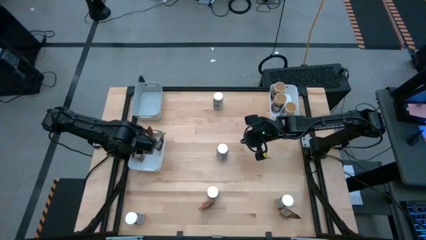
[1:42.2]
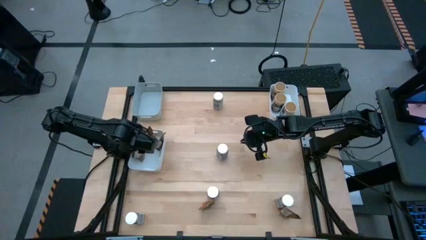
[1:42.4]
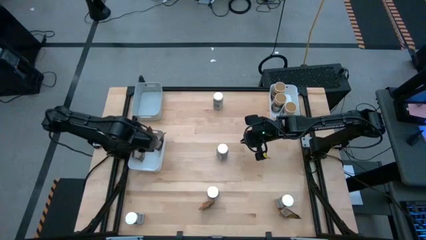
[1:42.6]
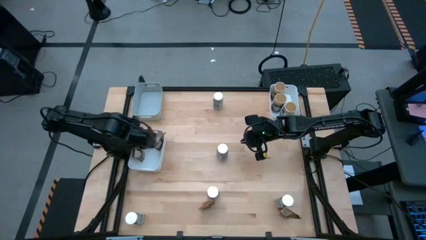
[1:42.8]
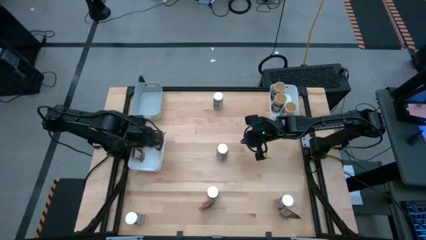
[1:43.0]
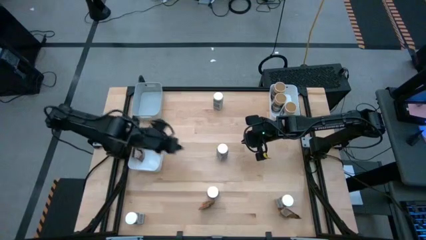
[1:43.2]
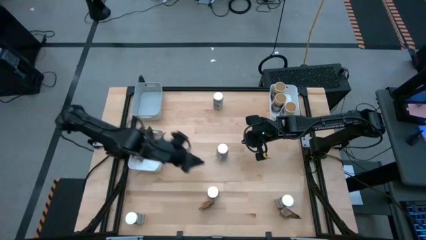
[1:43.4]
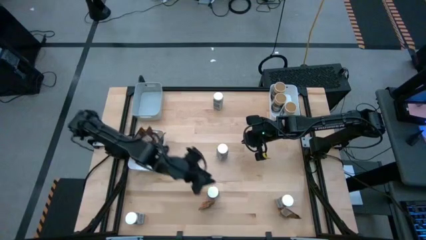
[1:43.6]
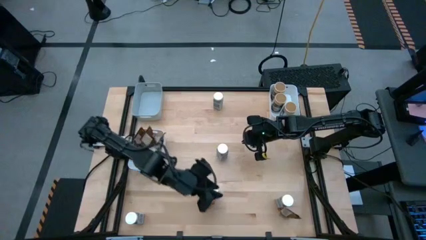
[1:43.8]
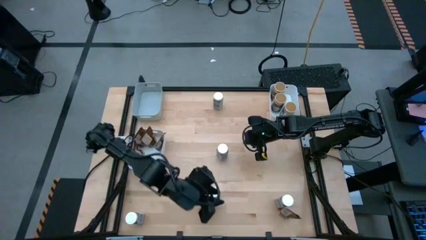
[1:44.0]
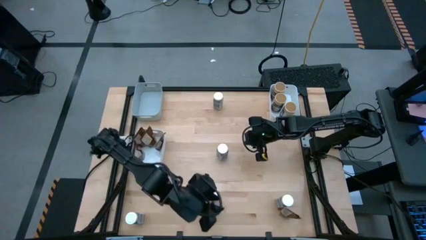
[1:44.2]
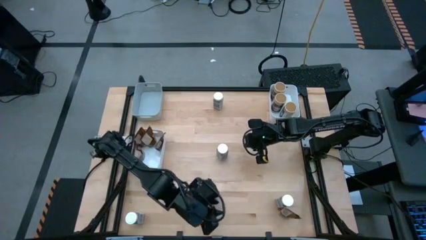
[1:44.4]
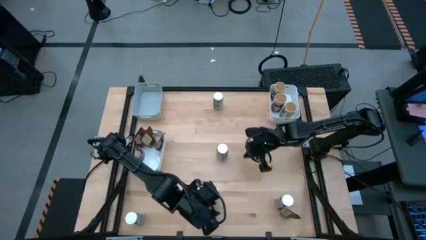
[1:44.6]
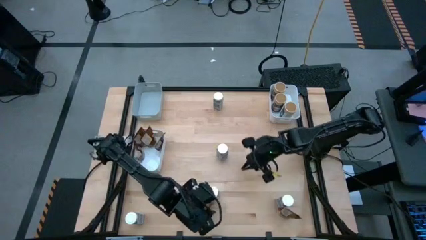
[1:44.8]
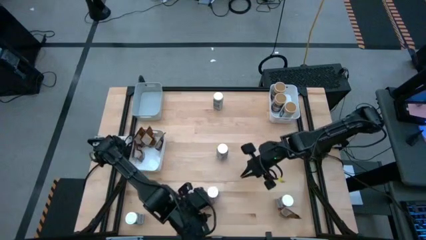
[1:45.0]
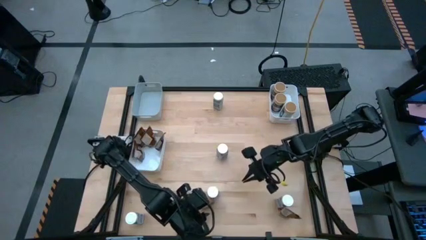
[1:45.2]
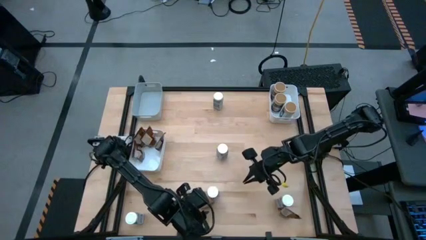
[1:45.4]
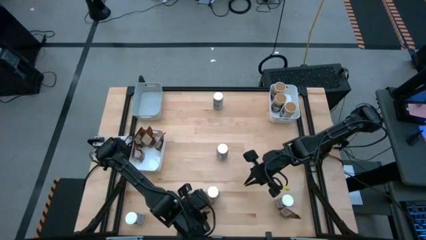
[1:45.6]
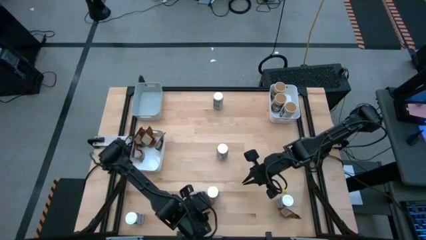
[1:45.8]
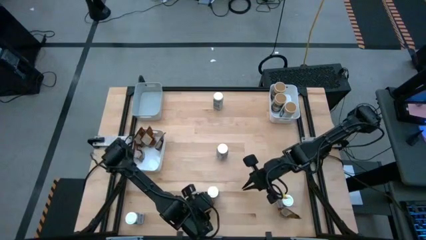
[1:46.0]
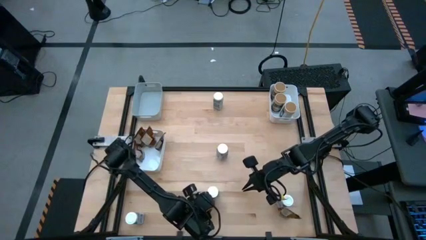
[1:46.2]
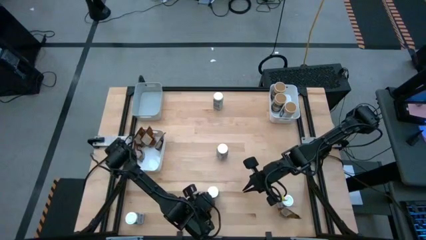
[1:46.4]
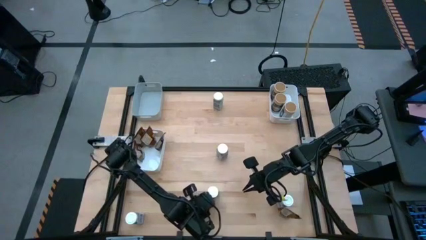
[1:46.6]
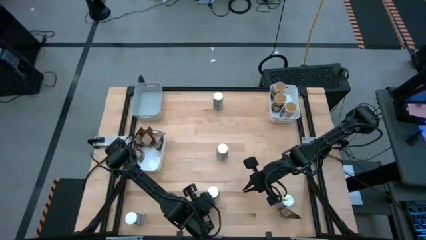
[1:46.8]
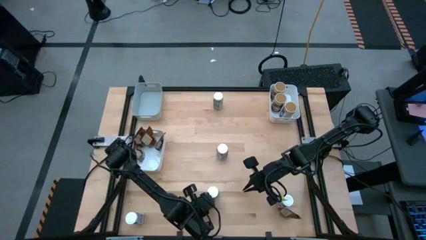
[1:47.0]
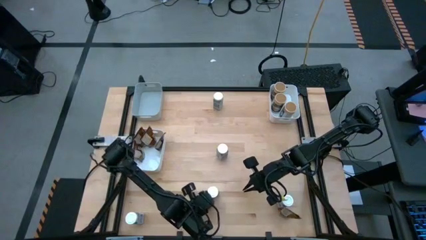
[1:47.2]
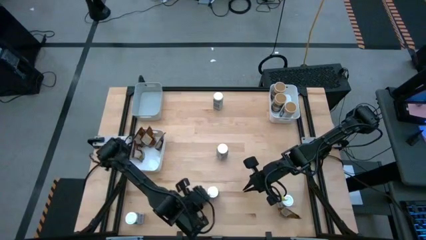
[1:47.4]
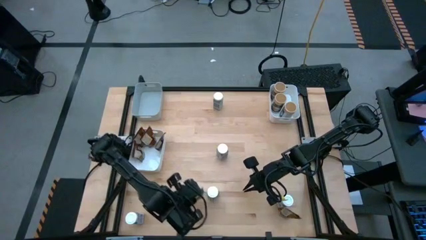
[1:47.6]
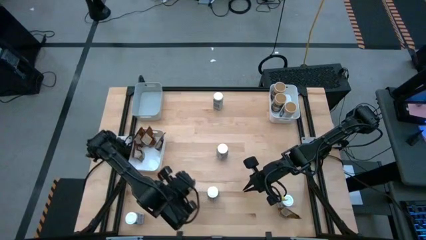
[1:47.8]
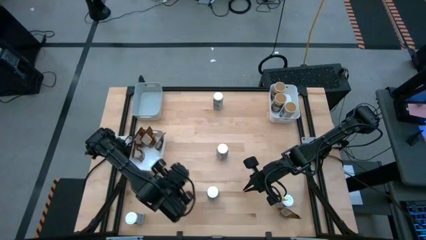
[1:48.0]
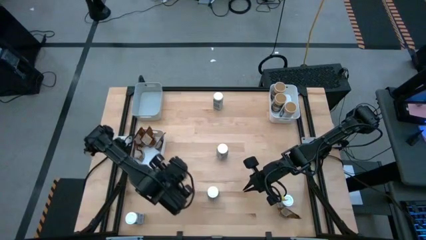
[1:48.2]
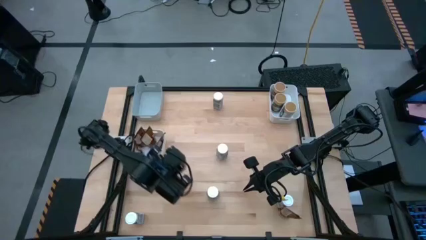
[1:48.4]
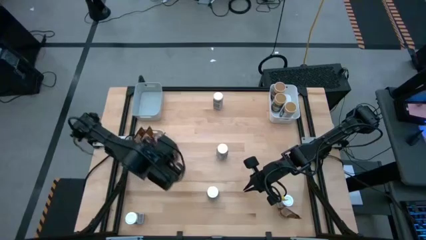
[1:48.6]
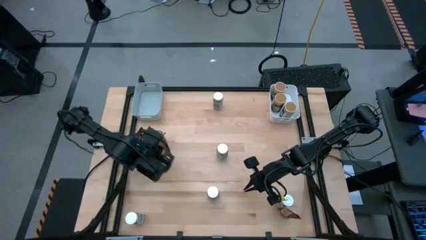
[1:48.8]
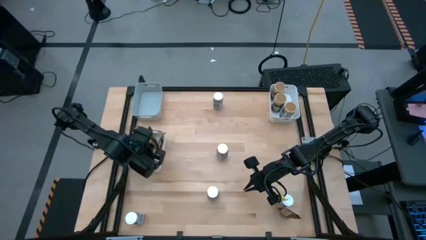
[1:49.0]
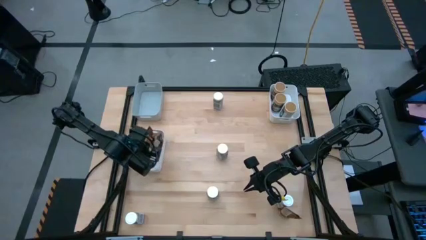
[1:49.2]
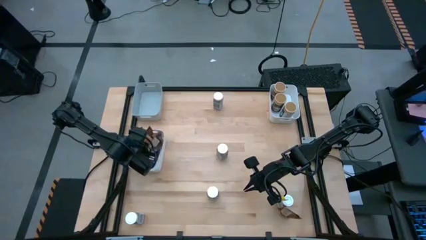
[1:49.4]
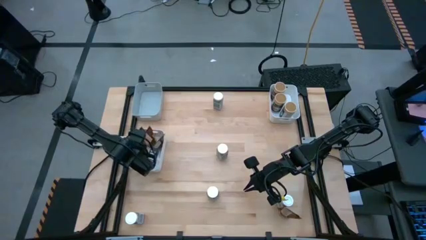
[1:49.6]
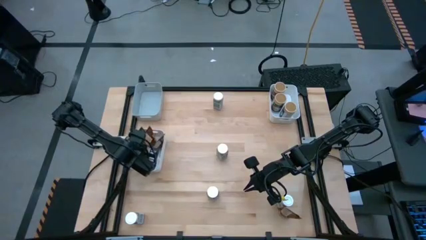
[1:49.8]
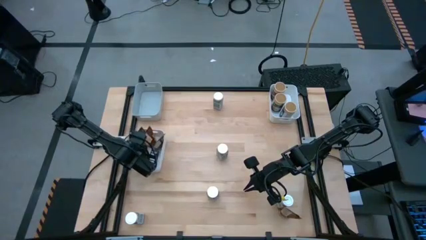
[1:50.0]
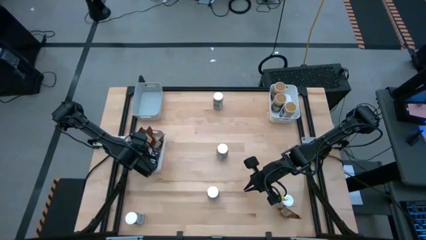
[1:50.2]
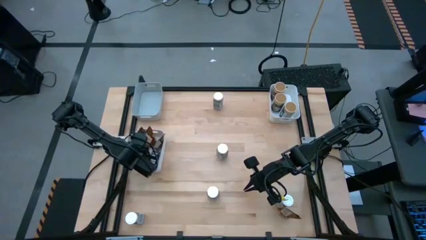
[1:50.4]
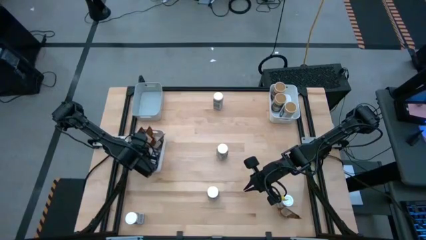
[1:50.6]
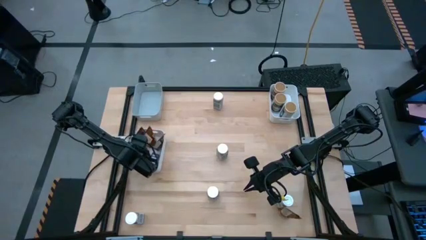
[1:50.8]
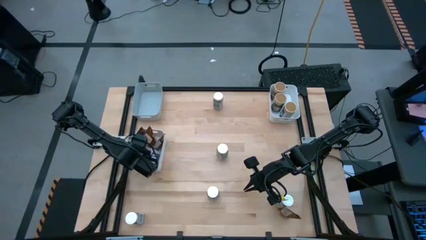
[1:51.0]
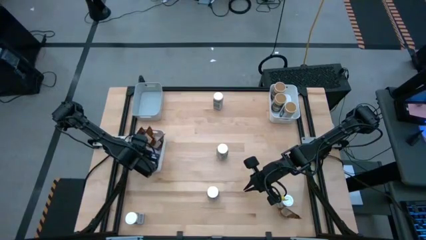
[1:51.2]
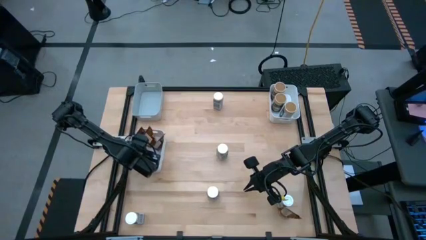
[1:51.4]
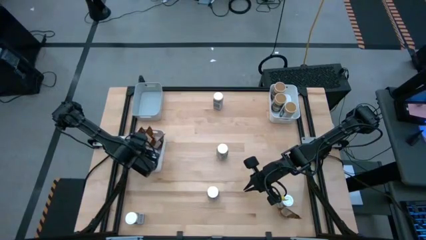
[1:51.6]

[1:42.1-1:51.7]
Task: Sort spices by type
Put the orange seasoning pack into the left white bin

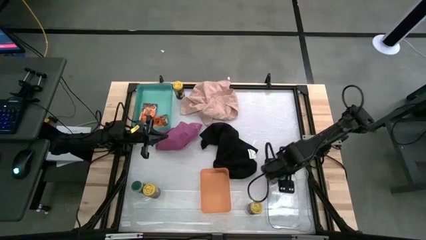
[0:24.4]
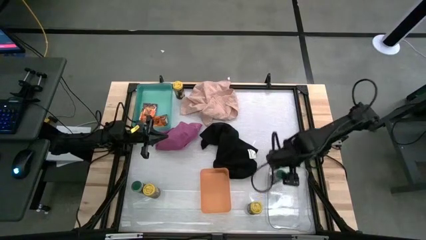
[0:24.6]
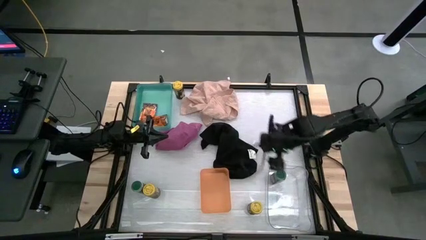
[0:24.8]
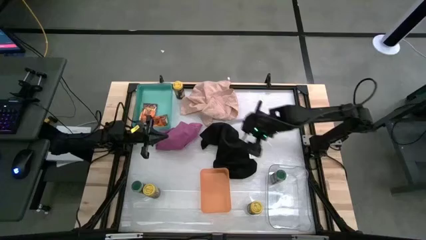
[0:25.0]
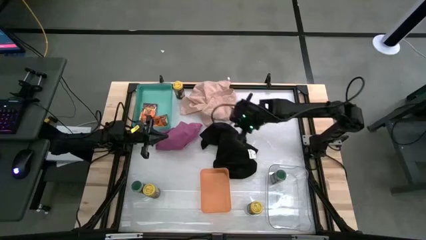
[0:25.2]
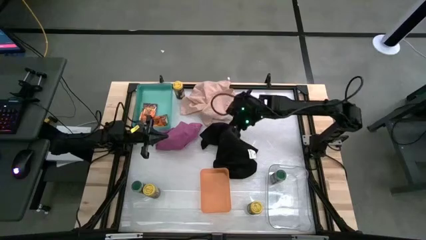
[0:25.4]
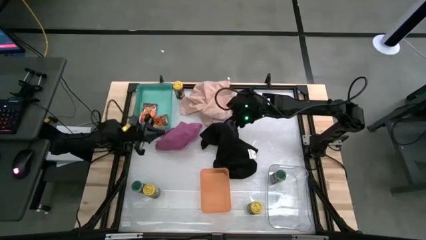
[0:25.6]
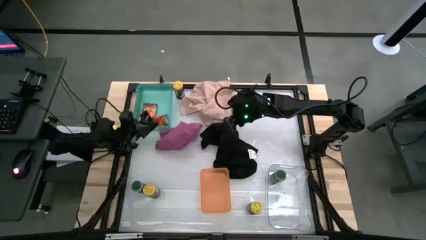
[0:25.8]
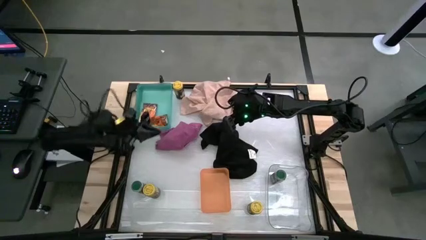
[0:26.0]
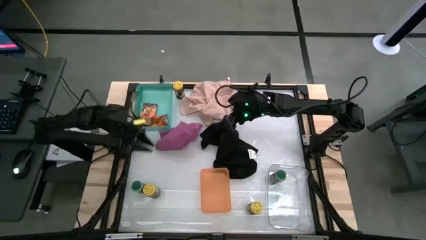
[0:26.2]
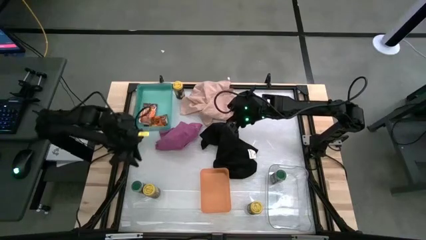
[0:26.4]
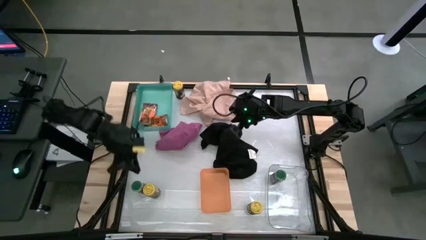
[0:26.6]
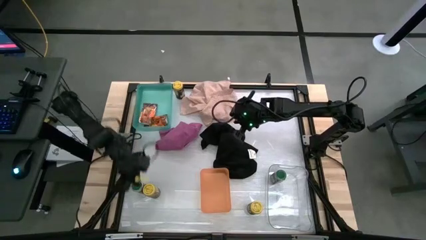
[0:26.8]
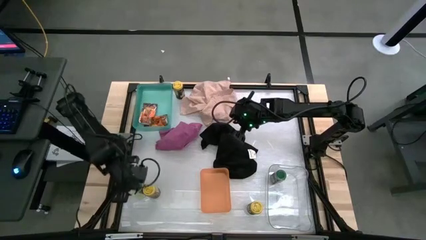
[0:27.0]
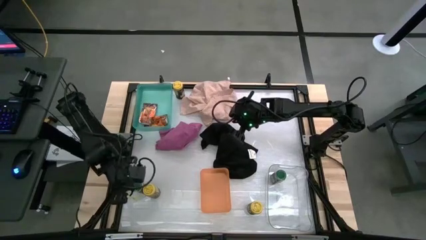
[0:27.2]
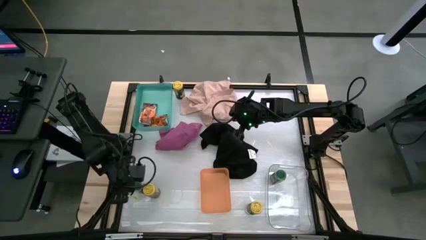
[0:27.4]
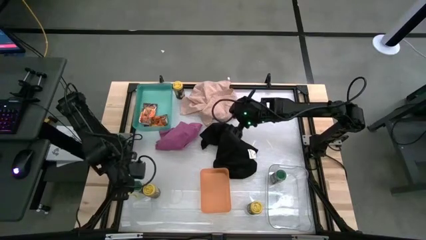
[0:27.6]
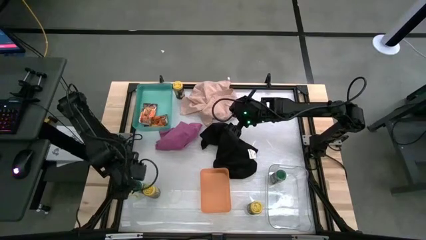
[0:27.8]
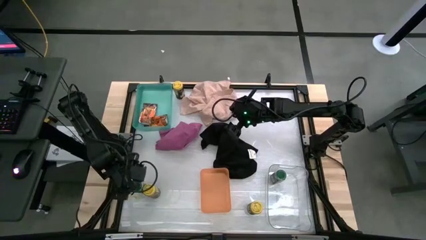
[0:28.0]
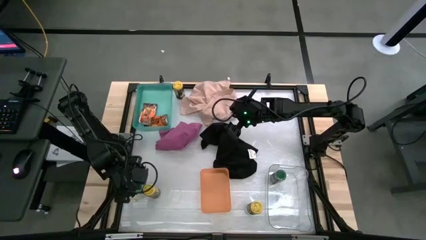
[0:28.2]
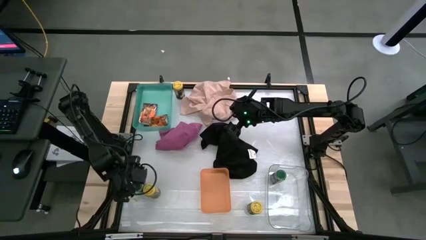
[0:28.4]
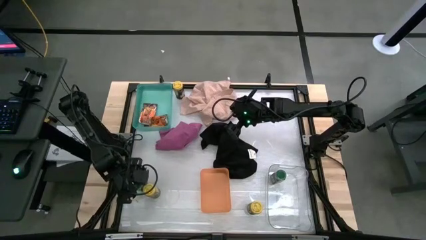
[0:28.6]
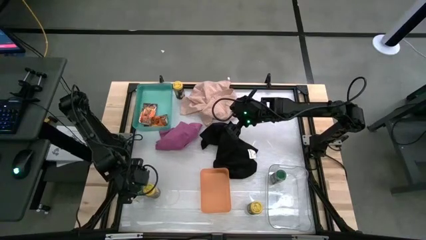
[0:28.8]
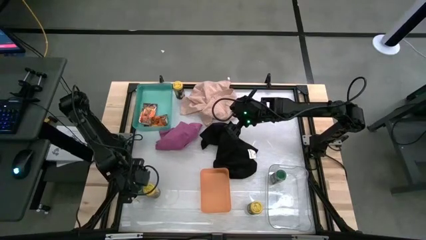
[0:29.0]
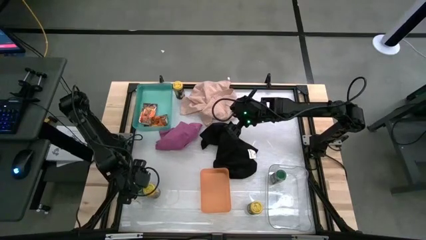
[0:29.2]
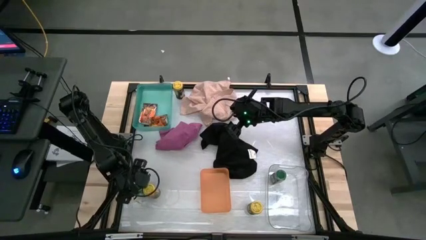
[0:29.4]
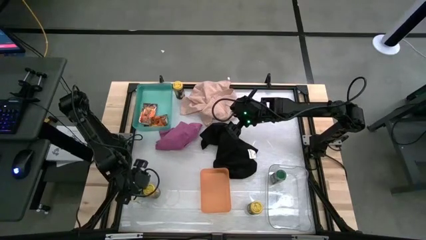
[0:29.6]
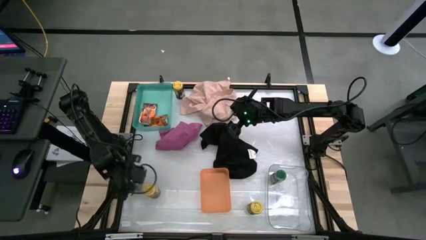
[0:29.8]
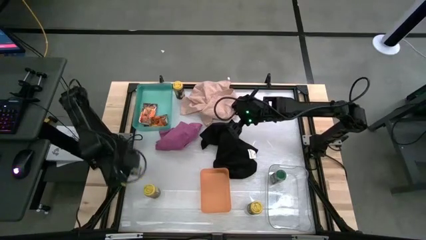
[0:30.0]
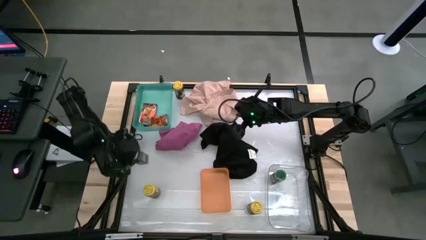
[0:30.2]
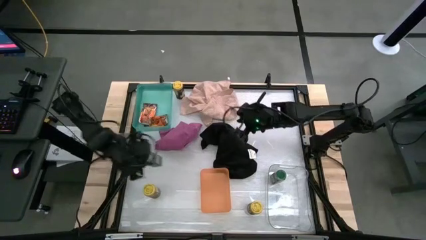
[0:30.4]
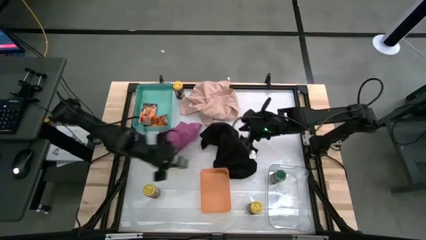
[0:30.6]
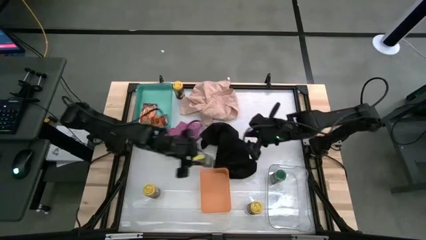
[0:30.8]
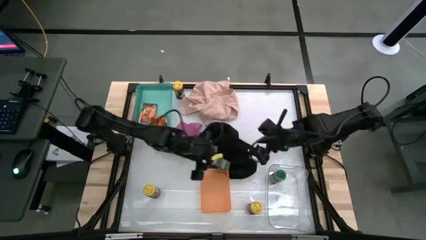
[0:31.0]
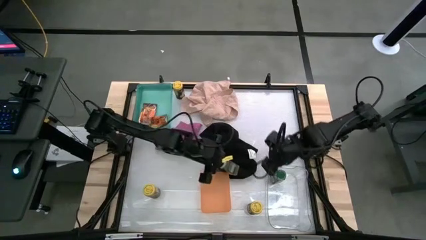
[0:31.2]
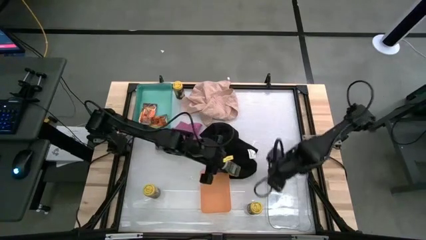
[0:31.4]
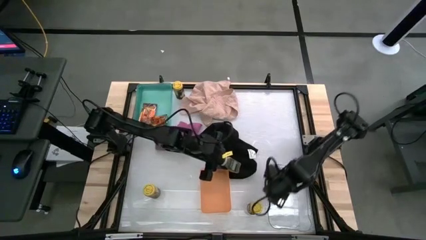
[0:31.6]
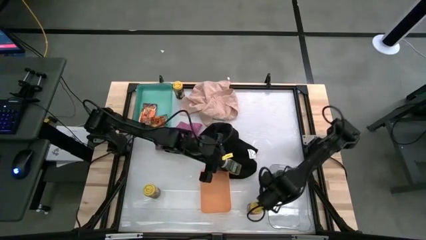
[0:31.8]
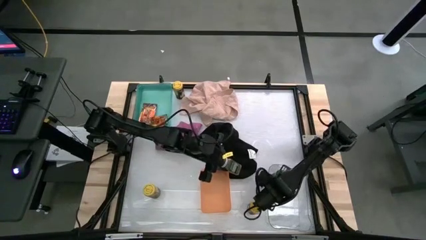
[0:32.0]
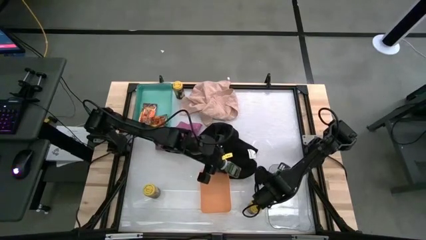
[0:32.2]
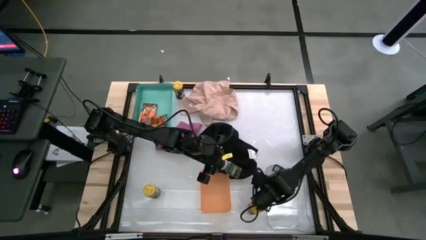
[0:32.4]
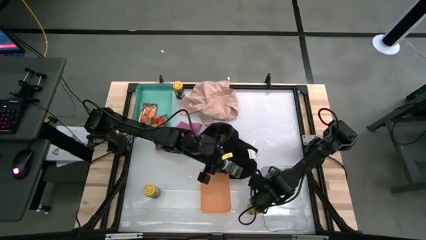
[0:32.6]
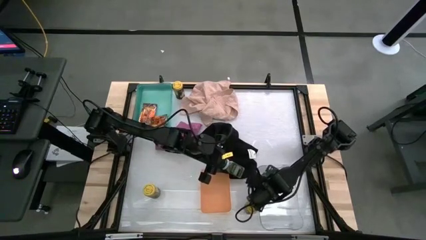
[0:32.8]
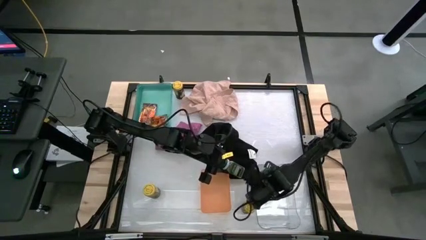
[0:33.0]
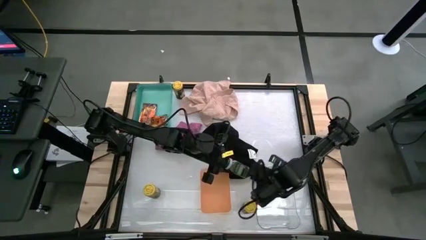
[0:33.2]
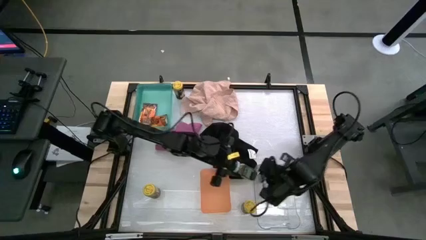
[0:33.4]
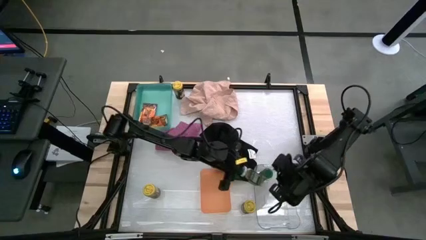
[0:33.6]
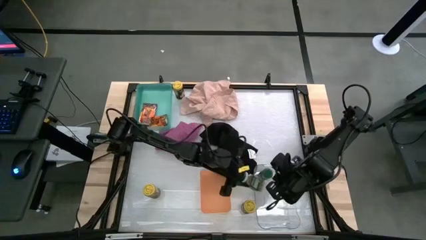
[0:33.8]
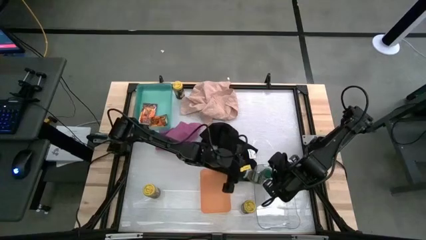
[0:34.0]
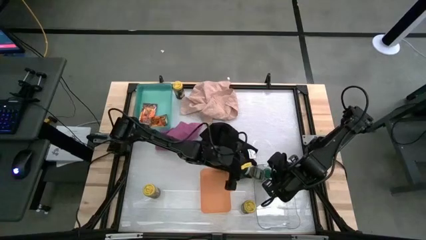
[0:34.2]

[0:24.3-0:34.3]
Task: Sort spices by type
Put the green seasoning bottle into the transparent bin
